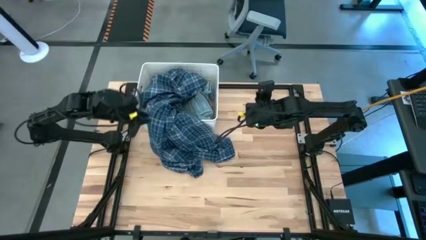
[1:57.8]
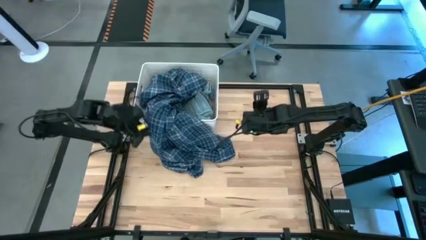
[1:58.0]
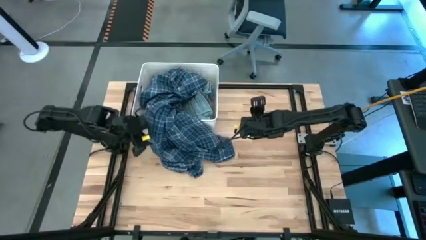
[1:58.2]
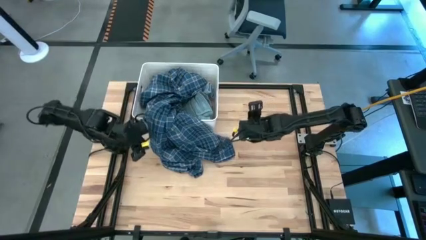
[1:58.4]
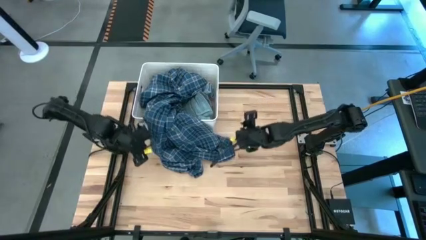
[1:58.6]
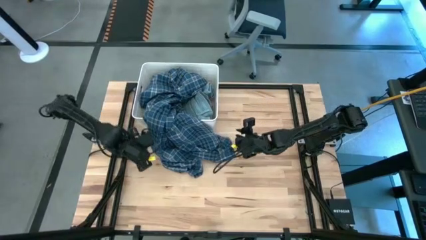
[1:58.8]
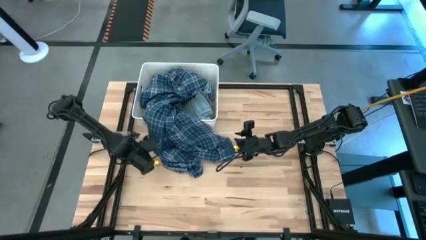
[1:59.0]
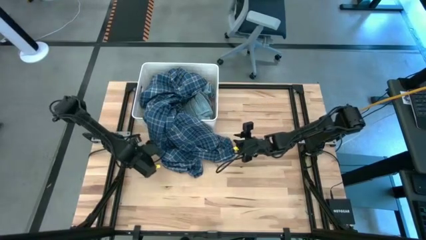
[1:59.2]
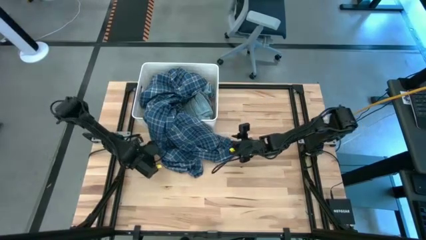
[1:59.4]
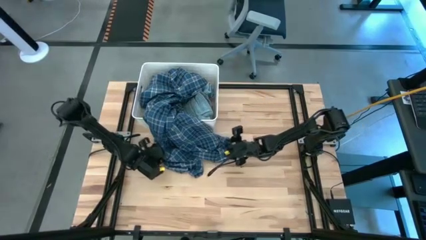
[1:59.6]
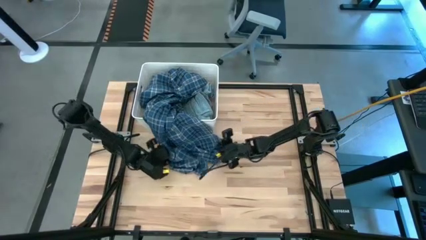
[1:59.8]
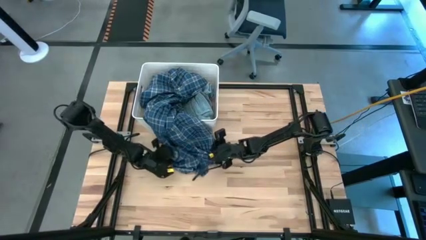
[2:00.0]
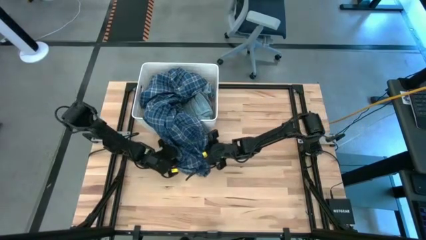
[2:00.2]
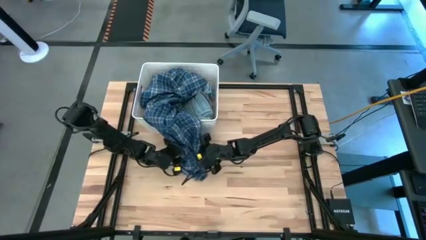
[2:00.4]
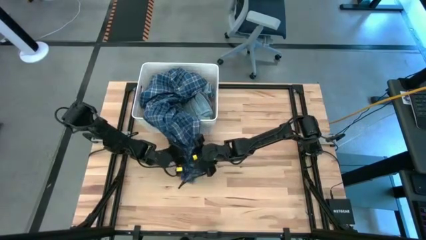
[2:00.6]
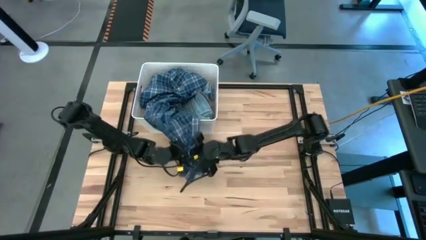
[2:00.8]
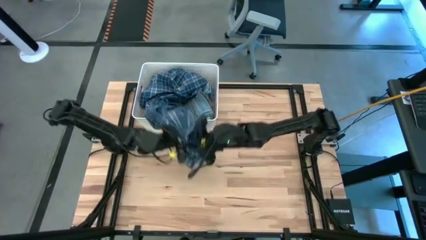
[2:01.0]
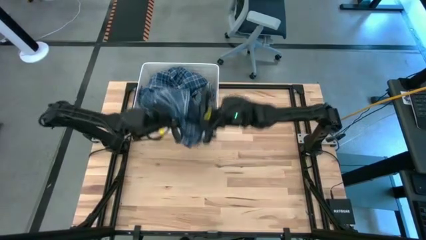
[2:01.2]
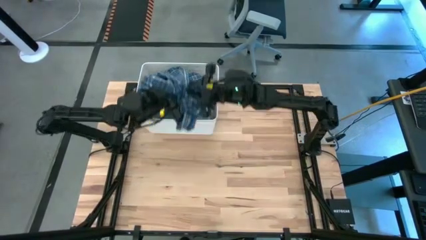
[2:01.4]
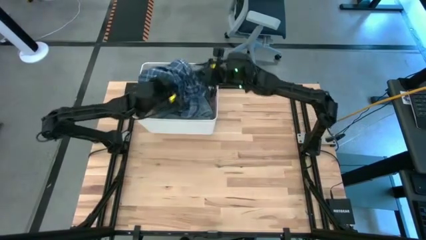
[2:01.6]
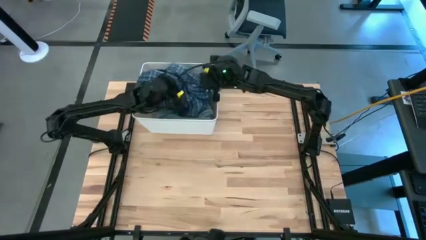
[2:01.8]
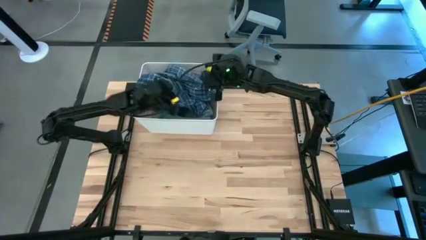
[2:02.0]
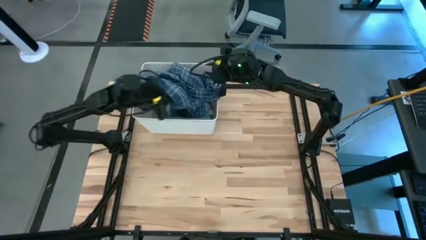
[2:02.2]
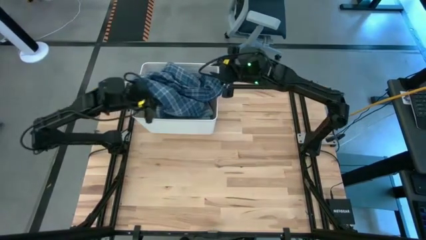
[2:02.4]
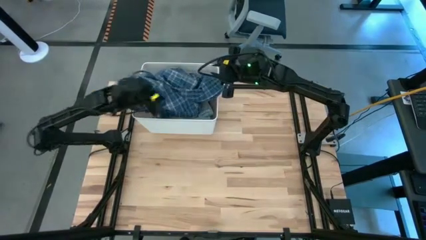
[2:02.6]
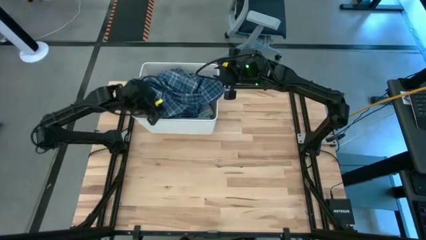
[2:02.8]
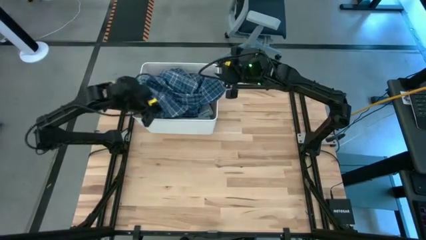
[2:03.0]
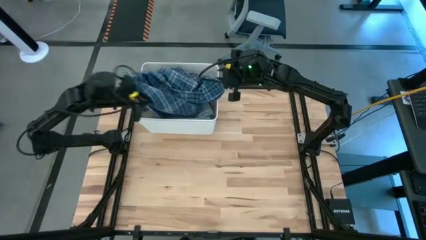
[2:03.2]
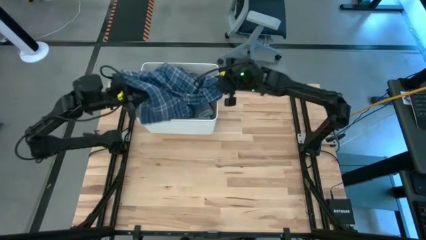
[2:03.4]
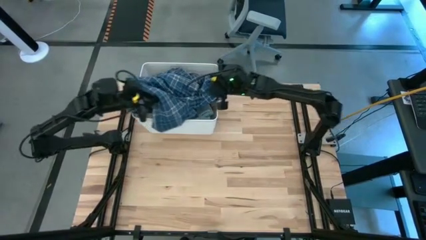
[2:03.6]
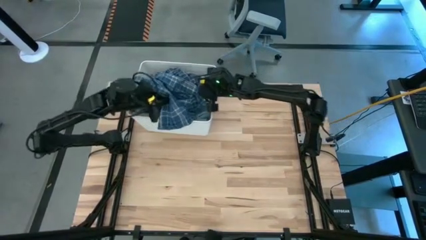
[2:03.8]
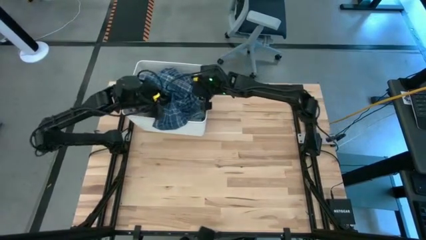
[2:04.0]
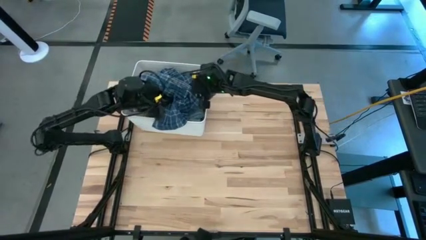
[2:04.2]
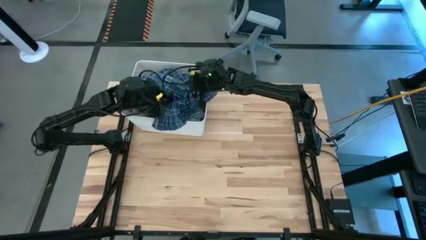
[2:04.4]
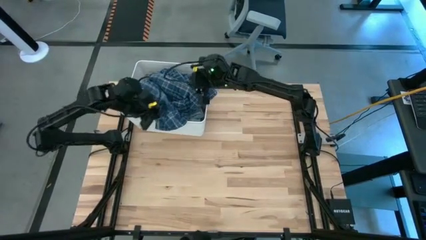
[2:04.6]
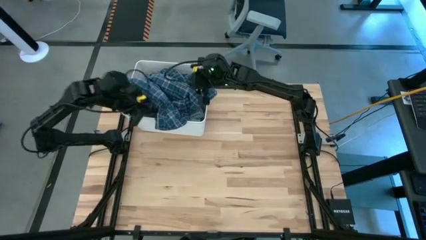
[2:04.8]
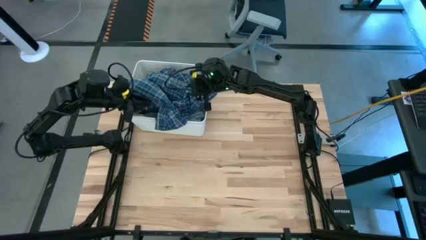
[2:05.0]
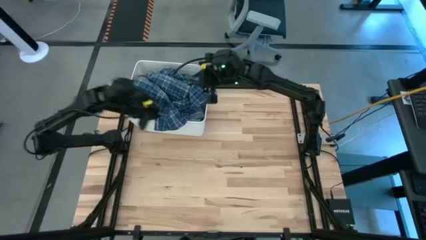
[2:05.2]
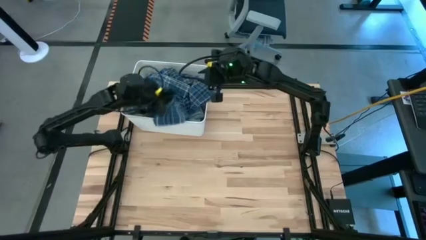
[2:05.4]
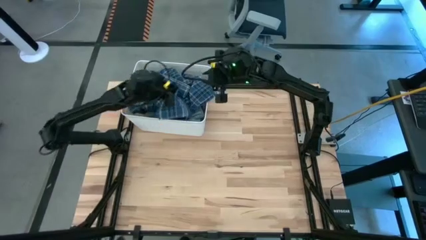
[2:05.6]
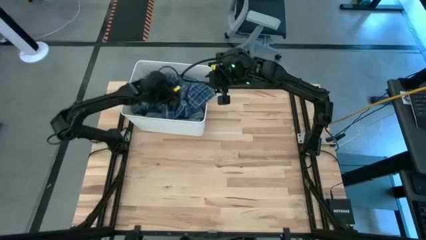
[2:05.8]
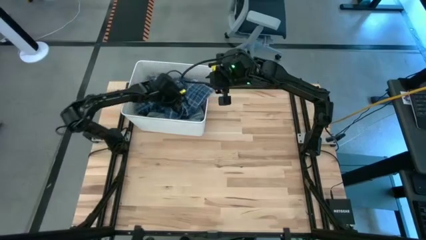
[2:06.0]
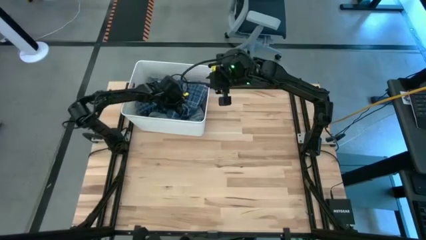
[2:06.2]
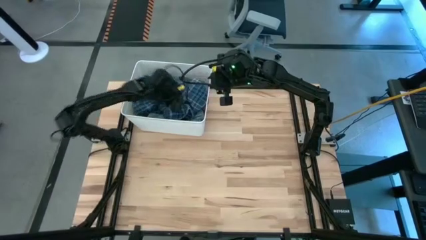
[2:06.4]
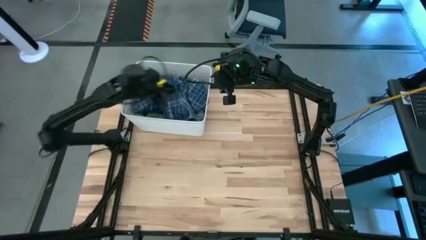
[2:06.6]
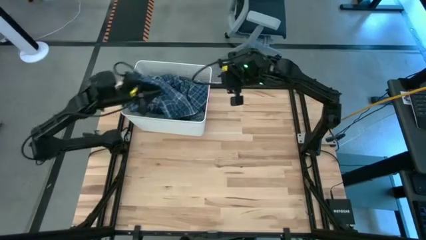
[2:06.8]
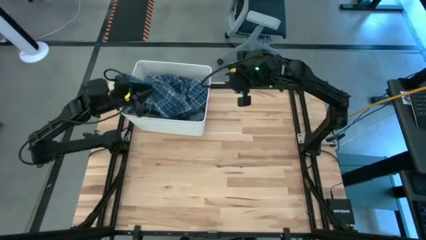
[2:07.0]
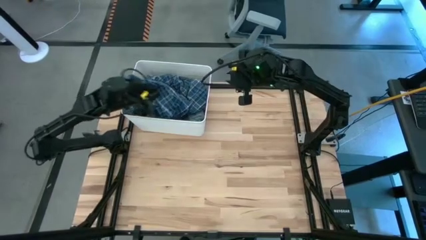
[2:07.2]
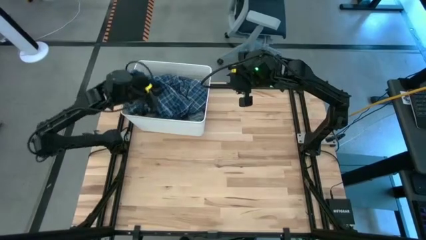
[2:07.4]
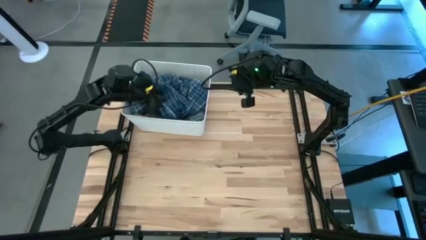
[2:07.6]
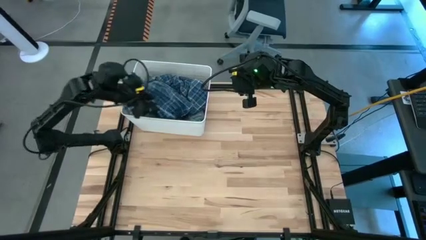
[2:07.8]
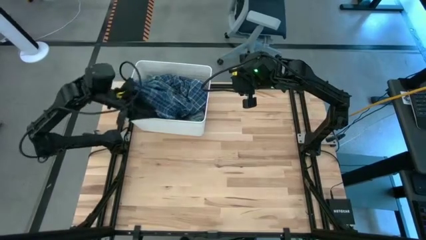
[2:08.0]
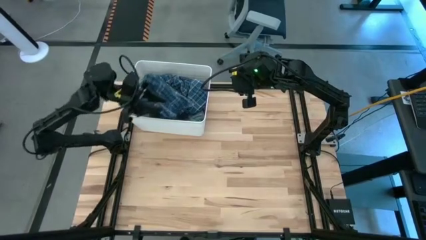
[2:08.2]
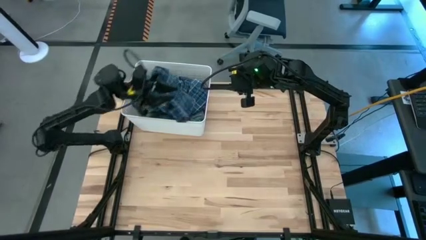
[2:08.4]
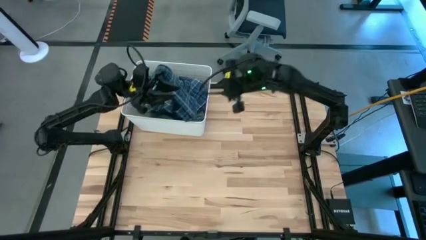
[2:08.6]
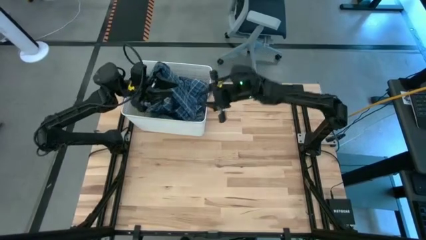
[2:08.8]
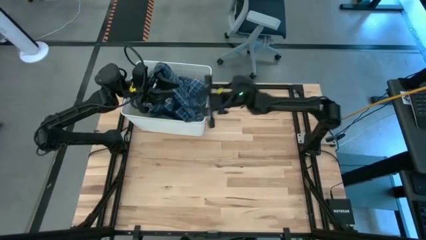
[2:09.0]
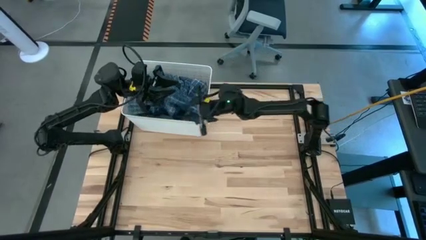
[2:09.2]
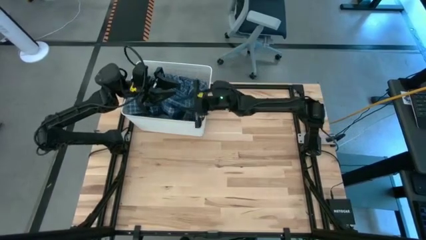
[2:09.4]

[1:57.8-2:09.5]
Task: Sort clothes
Put the blue plaid shirt into the white bin

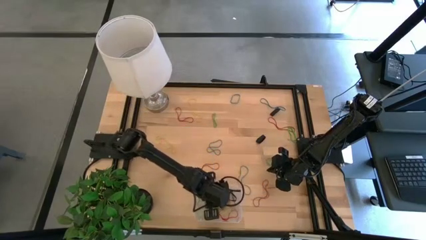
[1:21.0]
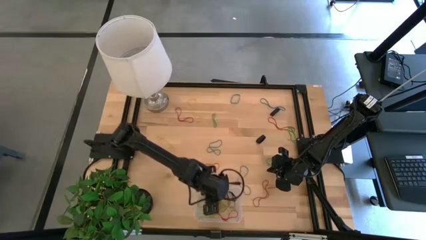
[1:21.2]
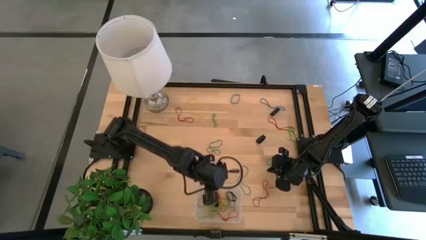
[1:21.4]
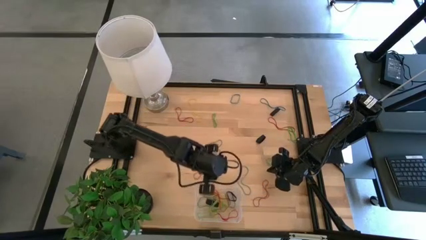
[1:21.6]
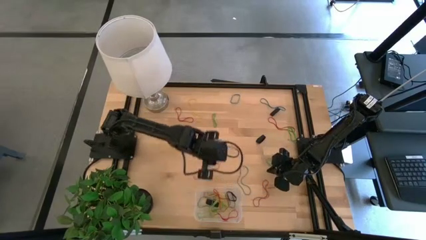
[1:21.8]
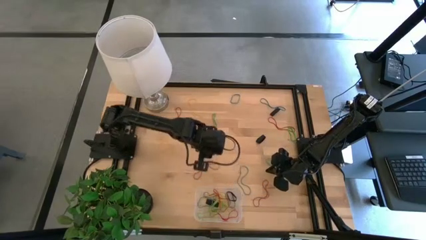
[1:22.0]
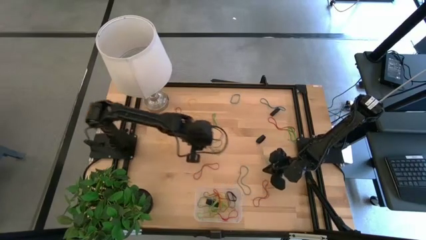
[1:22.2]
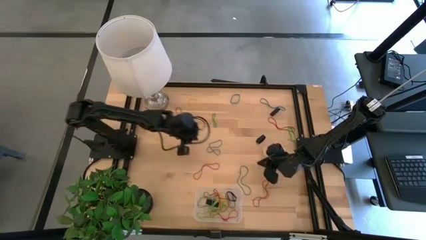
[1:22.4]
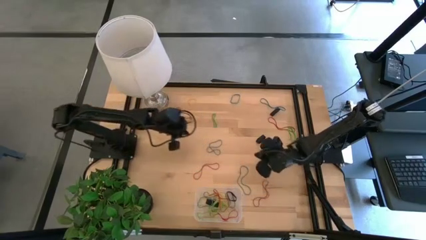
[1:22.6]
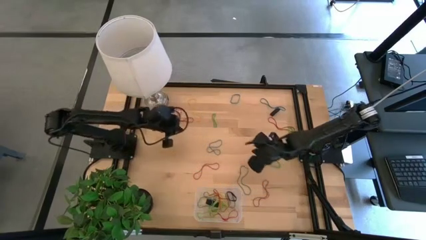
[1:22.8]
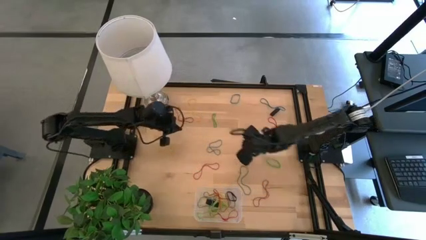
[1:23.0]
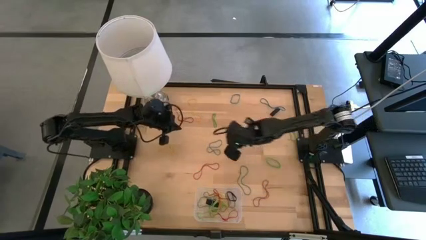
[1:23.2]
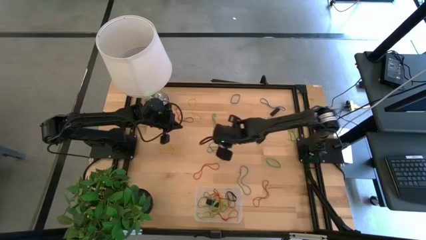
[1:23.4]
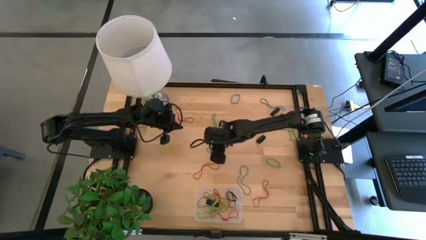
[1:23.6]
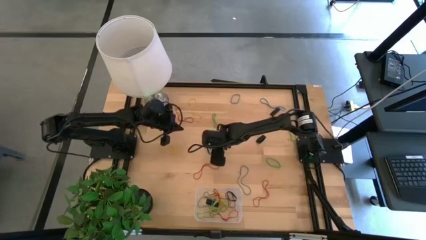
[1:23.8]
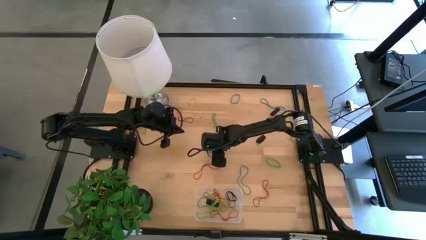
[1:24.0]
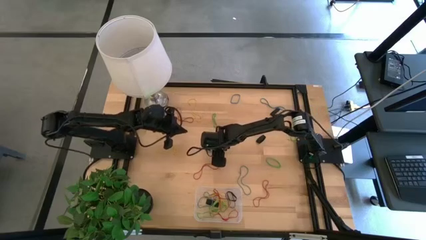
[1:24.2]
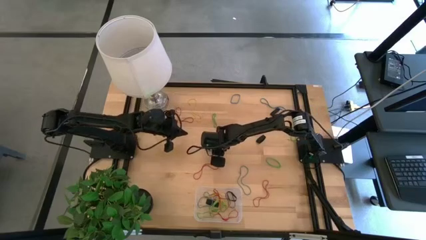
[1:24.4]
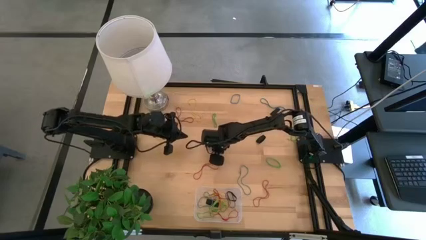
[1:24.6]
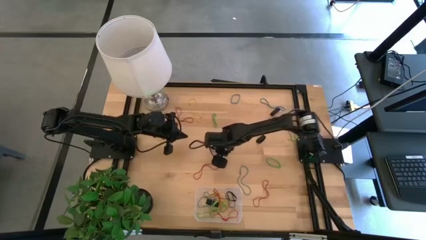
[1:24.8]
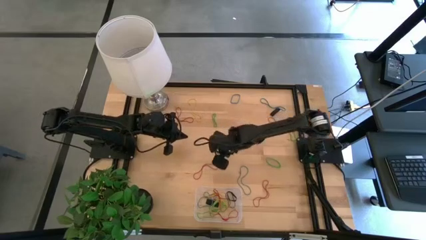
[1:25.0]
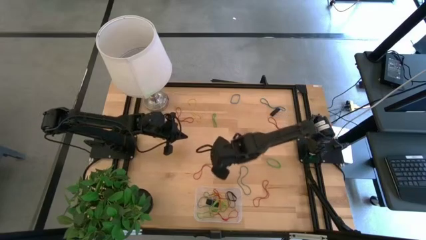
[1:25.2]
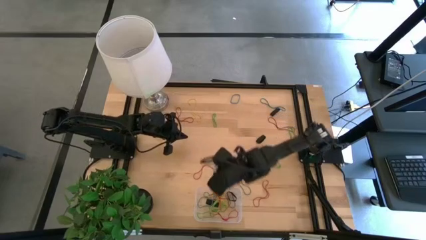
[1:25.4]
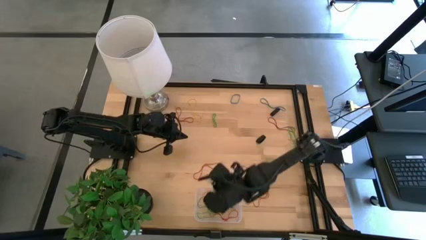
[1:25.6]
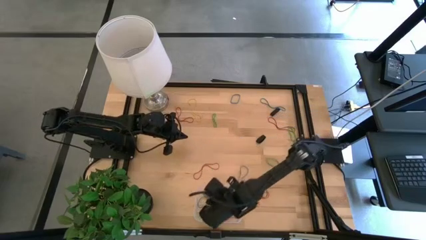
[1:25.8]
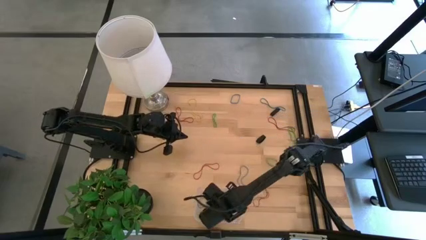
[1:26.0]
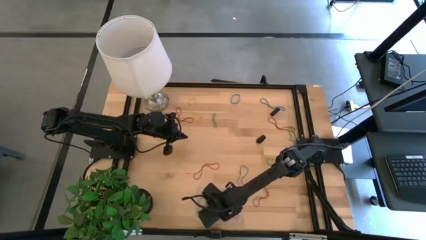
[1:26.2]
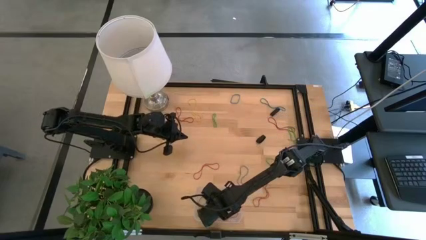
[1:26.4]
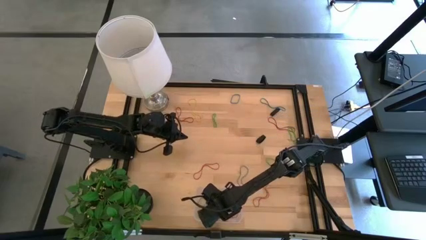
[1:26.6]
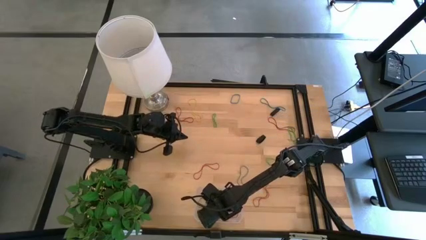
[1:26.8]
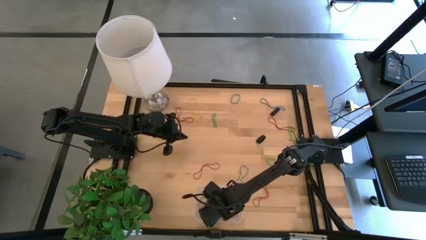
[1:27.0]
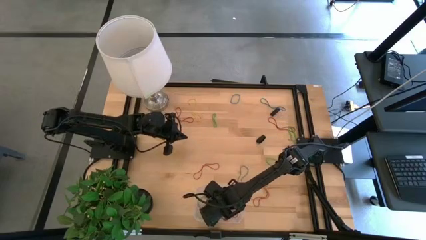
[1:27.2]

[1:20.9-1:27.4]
Task: Pick and place rubber bands into bin
Put the blue rubber band into the transparent bin
